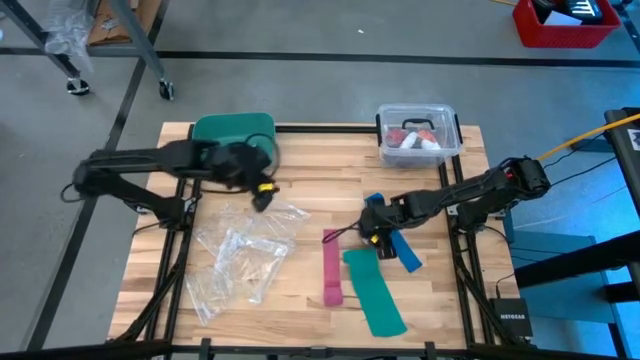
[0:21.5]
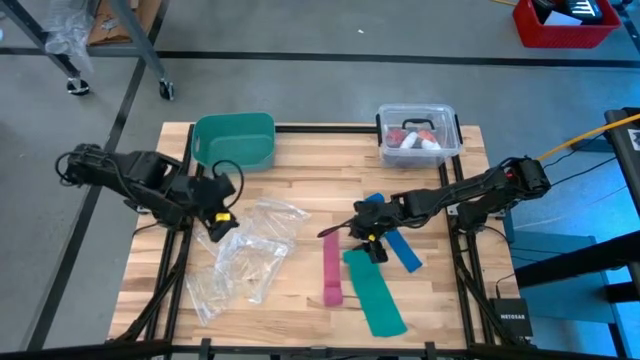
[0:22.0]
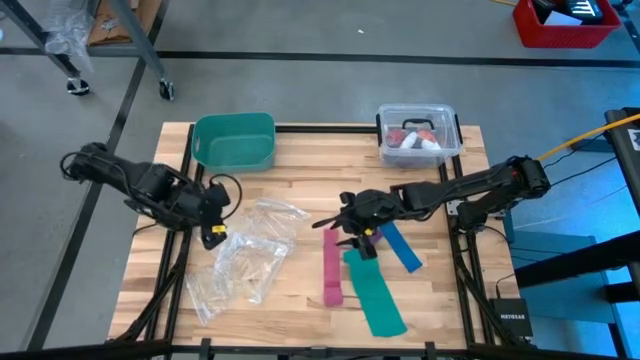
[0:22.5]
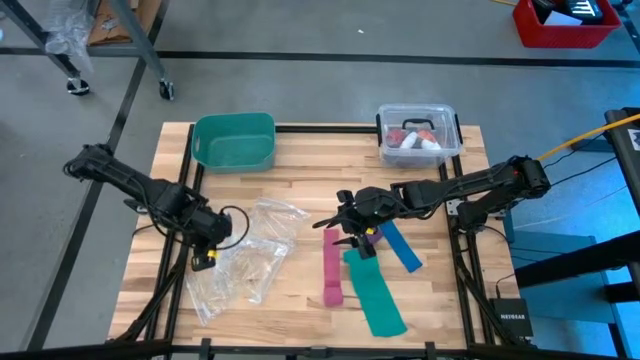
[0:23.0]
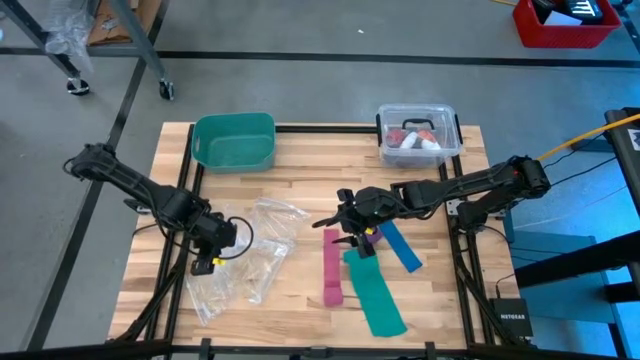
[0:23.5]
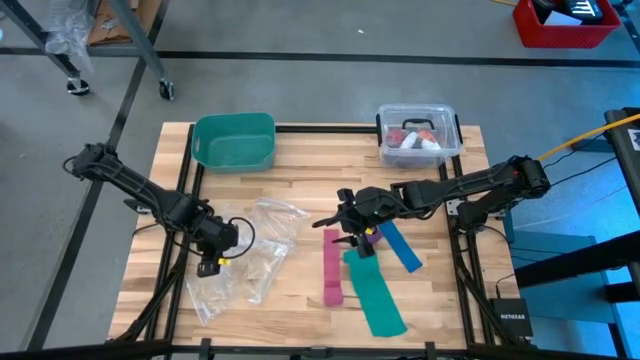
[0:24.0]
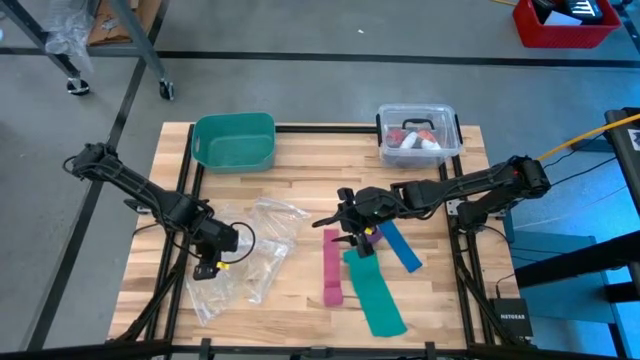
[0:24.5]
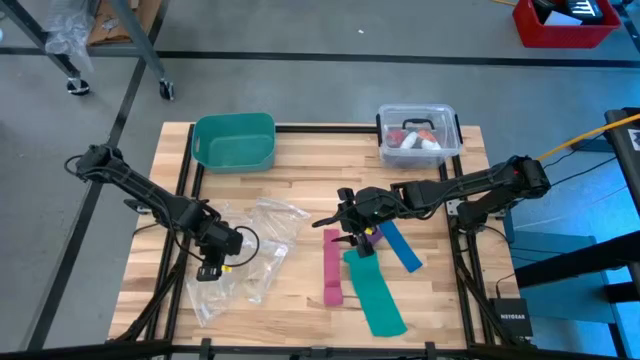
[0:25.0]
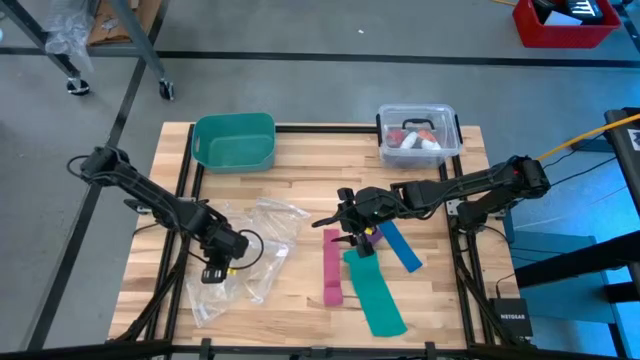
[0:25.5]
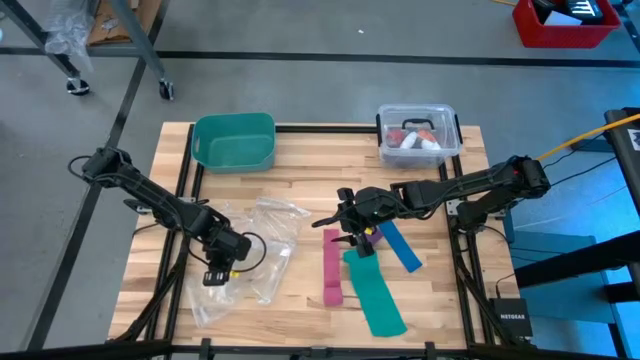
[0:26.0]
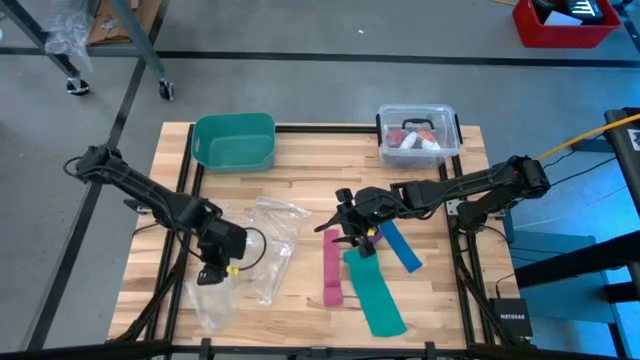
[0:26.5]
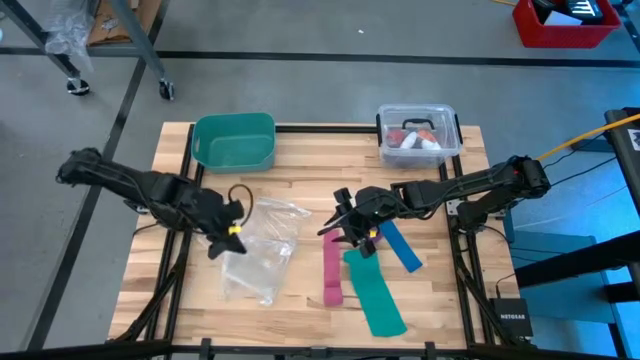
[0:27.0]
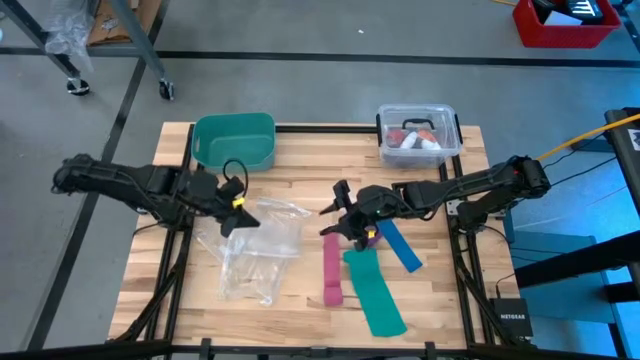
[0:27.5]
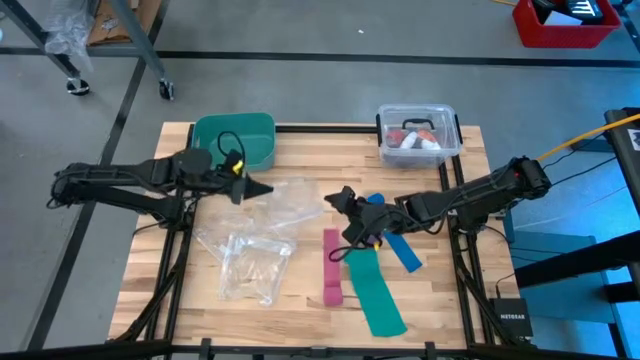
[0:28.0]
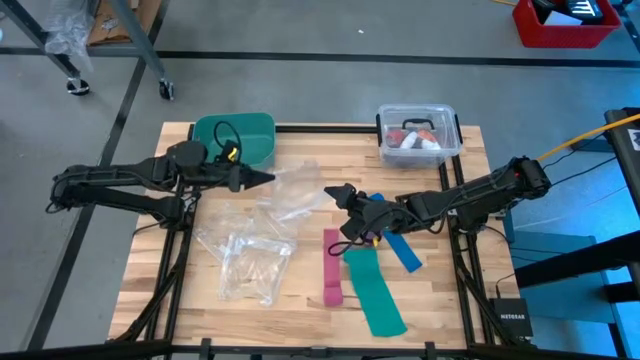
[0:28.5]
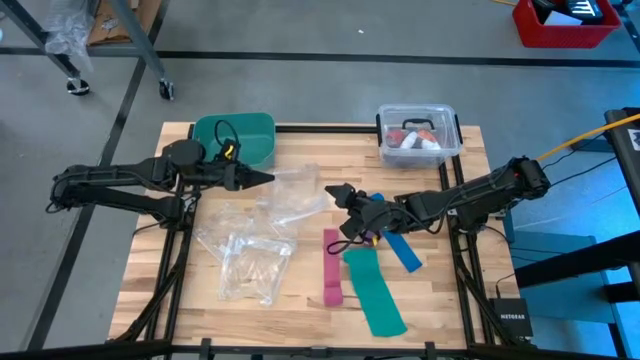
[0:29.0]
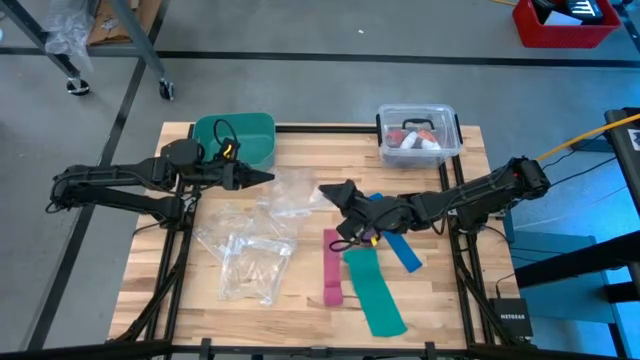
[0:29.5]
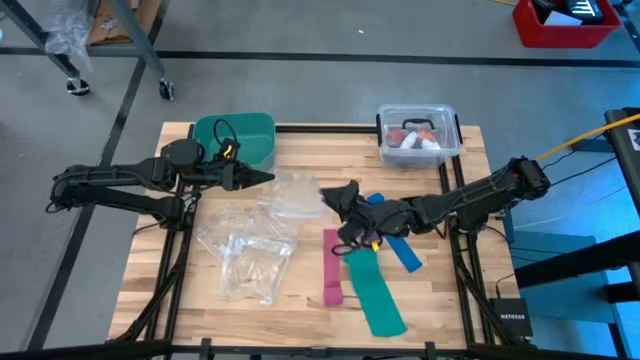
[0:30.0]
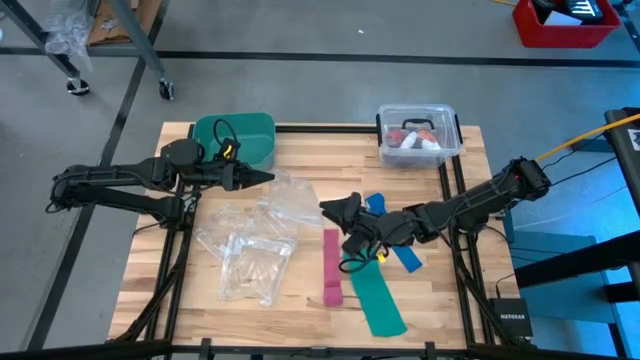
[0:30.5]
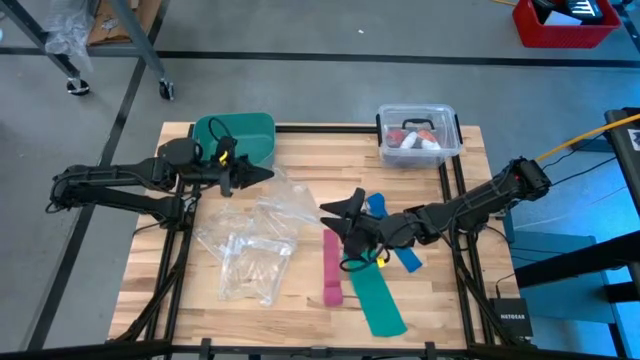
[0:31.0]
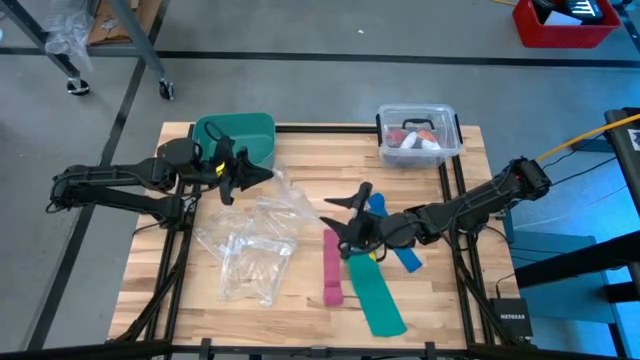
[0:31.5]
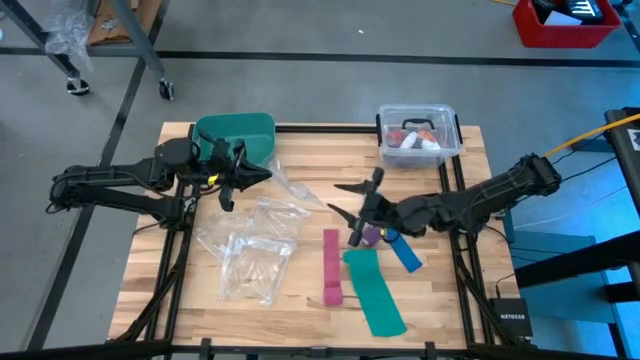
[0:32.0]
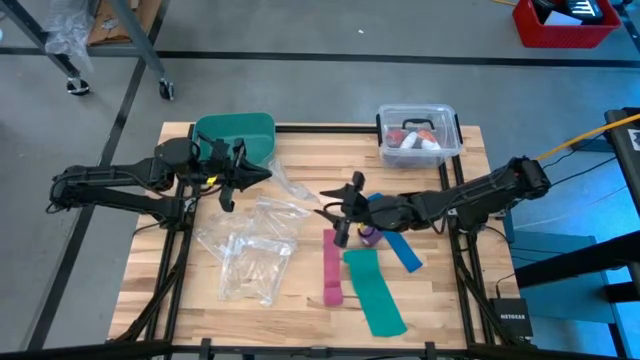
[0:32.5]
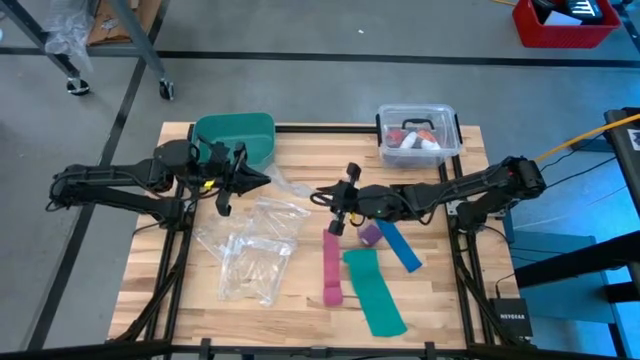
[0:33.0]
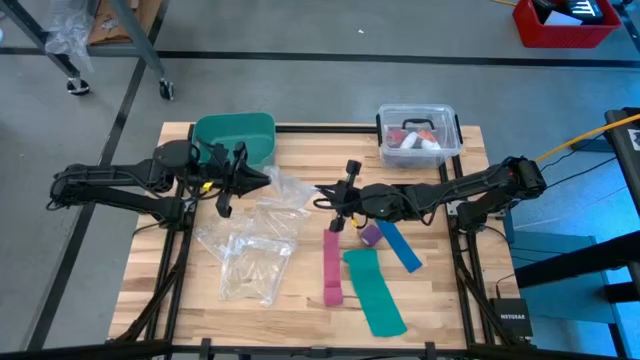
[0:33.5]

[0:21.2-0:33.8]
Task: Roll bandage
Open the bottom left transparent zip bag

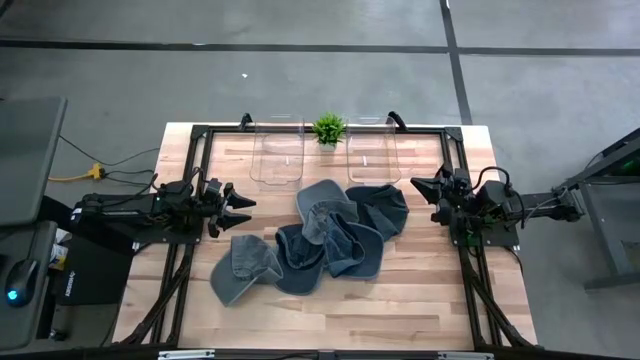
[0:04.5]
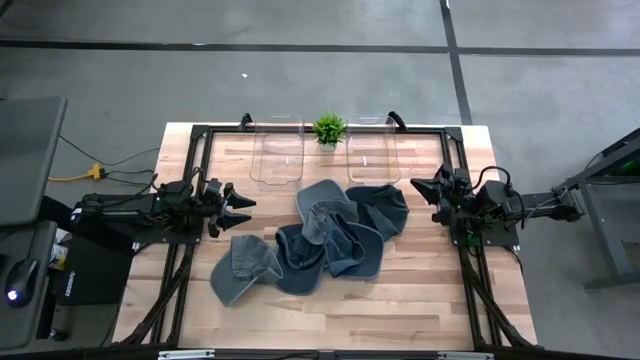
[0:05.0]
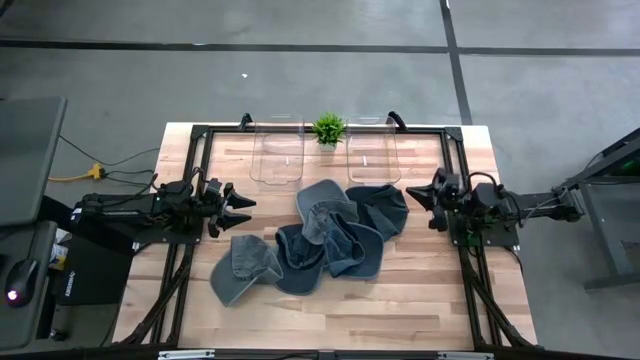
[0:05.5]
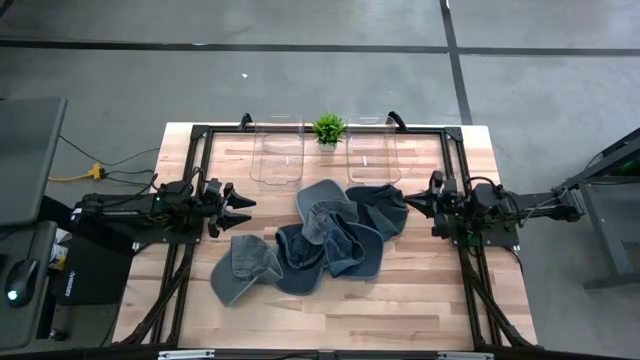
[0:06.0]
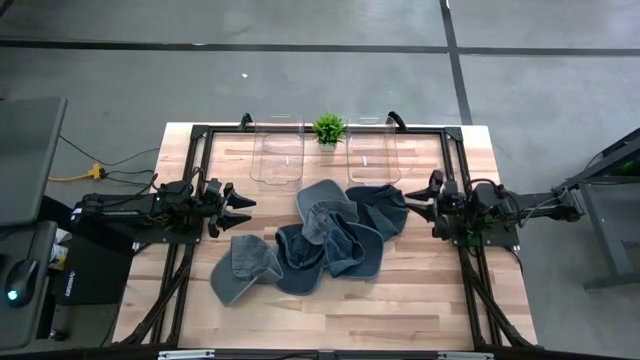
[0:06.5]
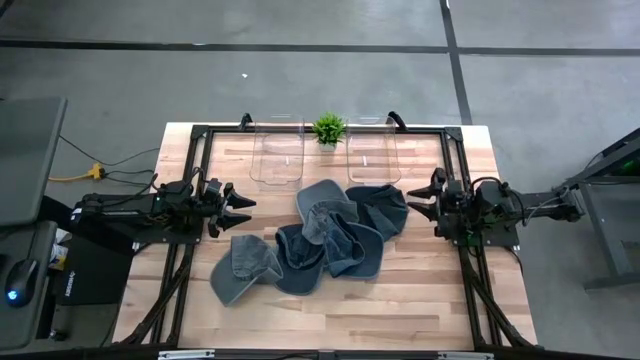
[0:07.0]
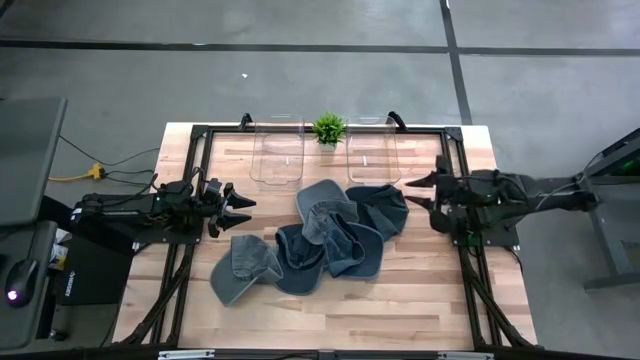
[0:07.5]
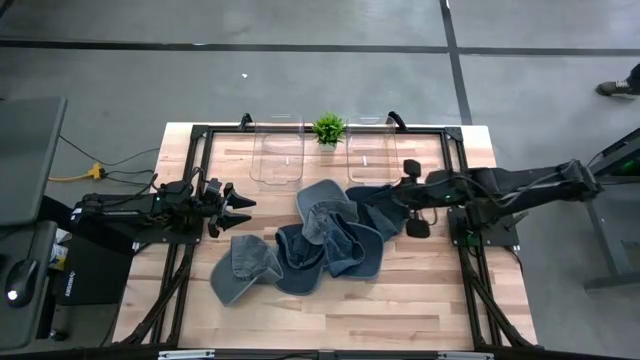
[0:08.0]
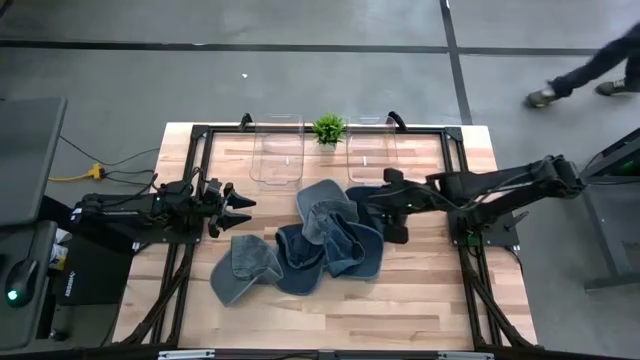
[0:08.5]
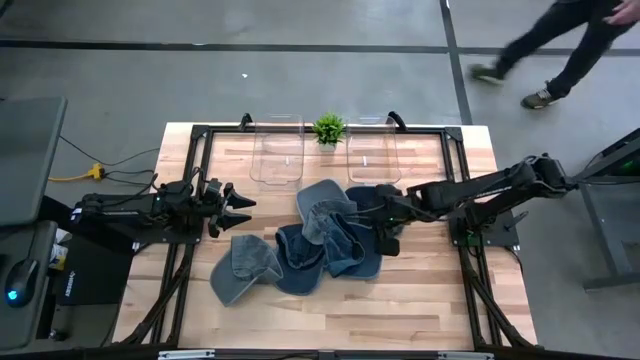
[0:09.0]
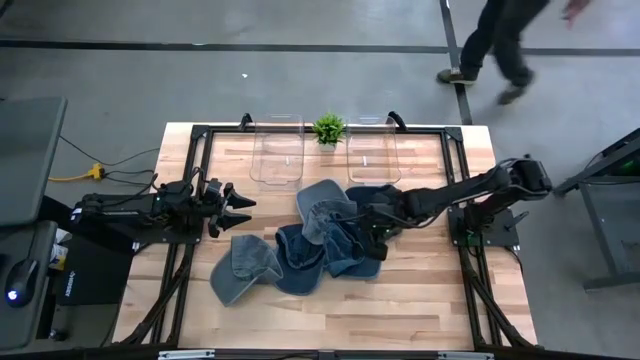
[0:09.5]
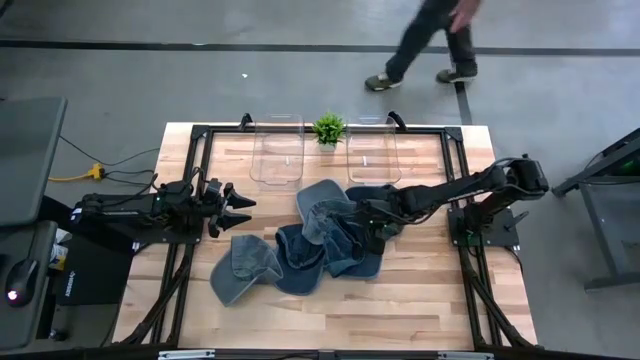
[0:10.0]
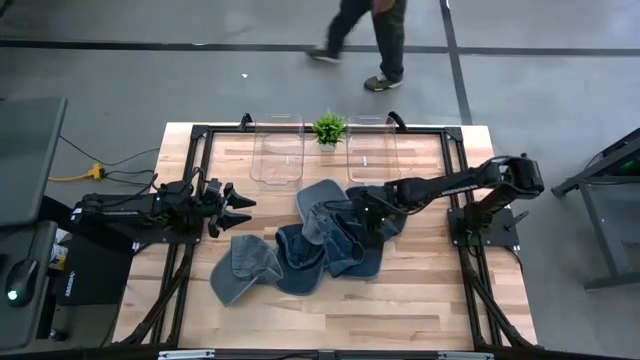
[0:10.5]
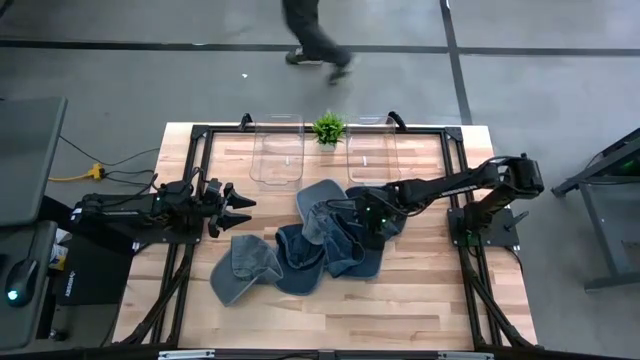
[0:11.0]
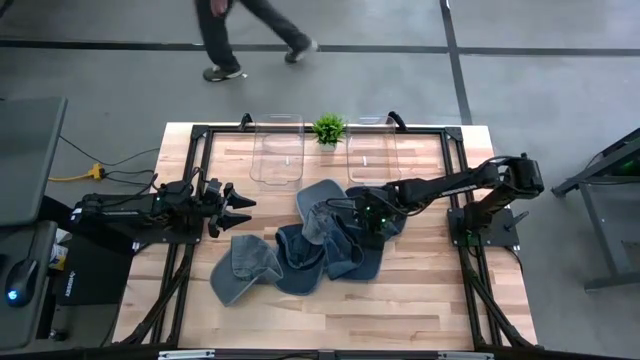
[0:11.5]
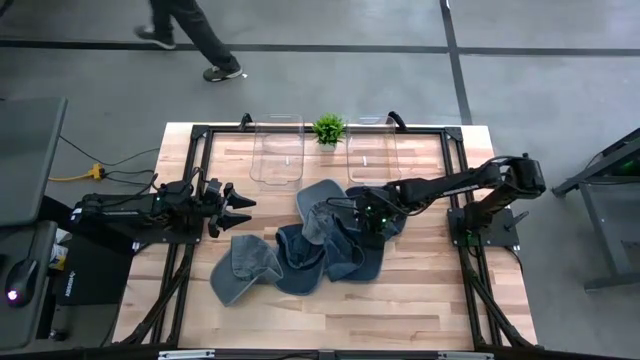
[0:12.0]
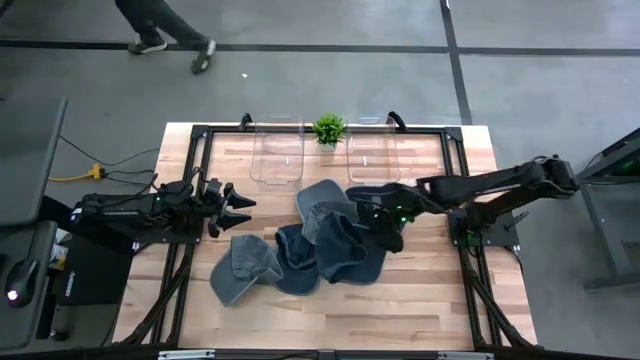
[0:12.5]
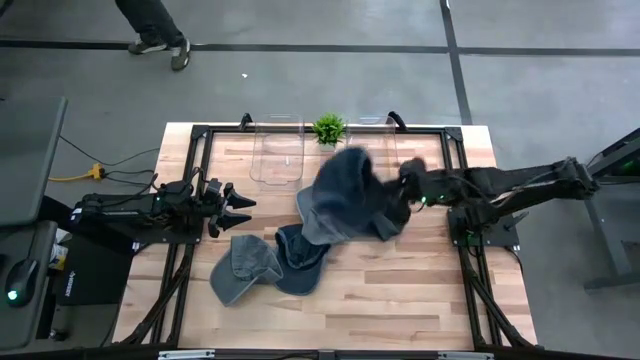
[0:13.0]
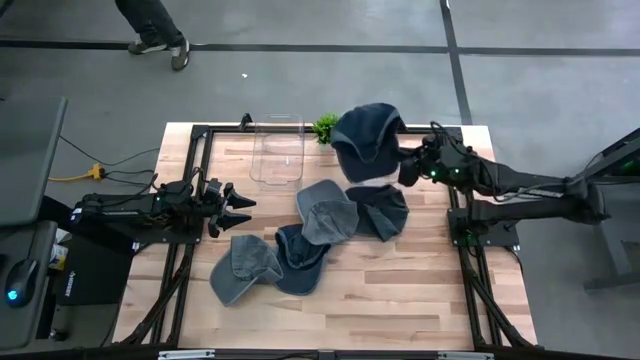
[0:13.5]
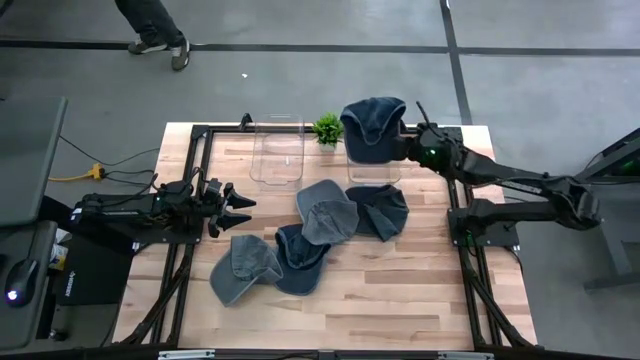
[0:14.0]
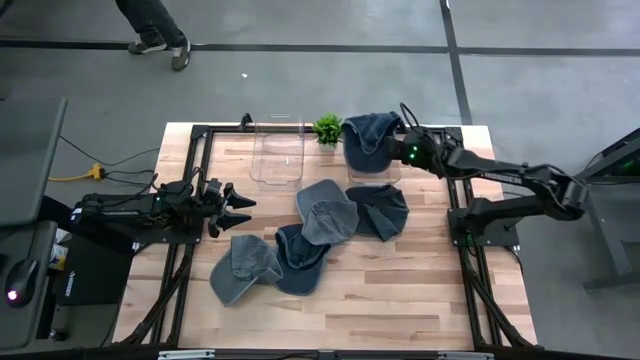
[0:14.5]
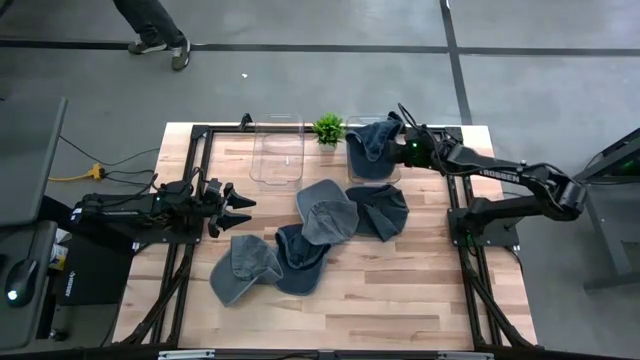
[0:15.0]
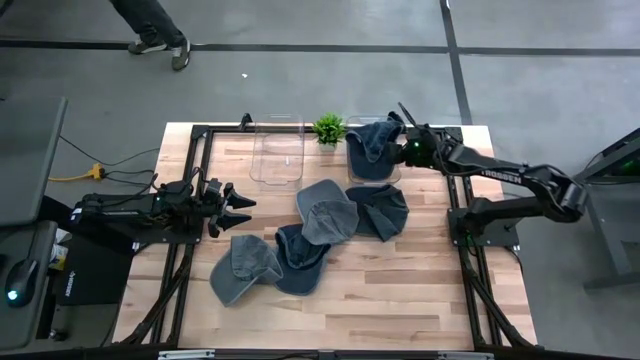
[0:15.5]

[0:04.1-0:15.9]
Task: Pick & Place hat
Put the bottom right blue cap into the right transparent bin
